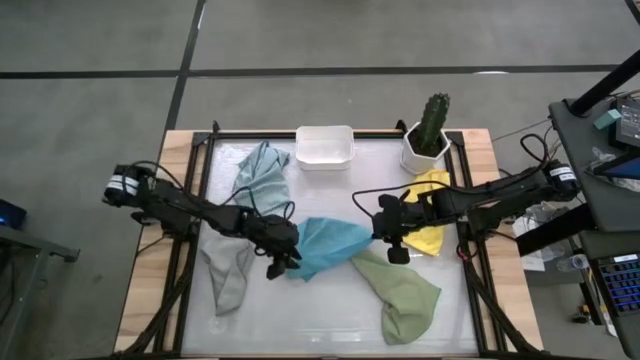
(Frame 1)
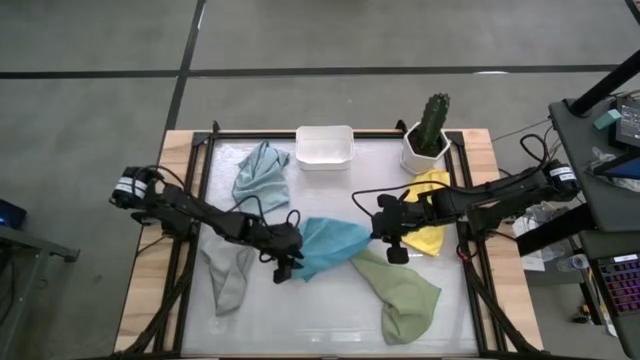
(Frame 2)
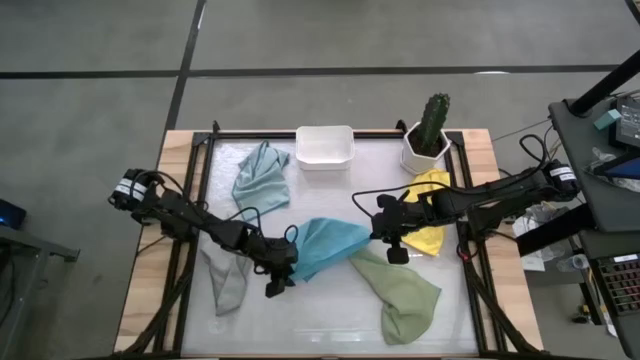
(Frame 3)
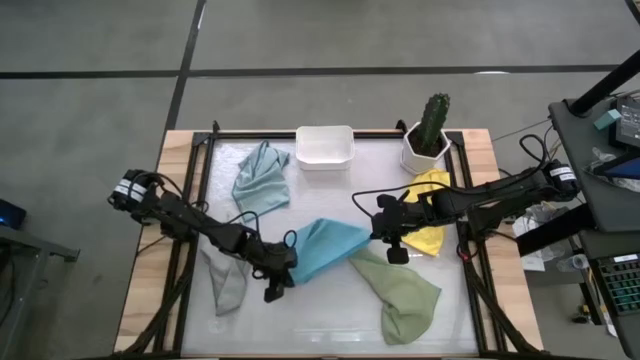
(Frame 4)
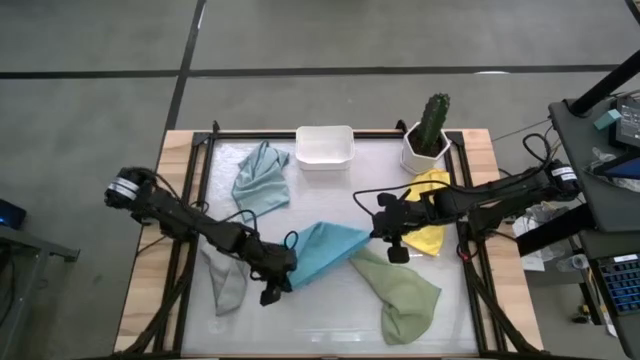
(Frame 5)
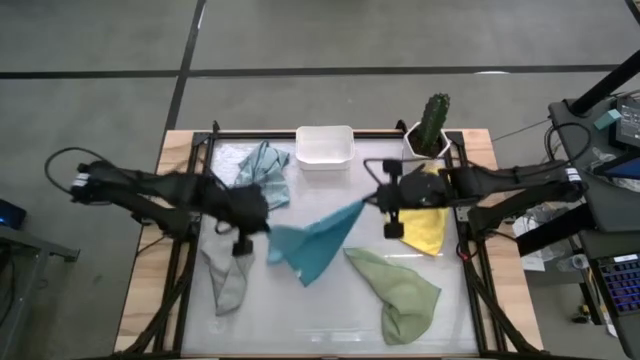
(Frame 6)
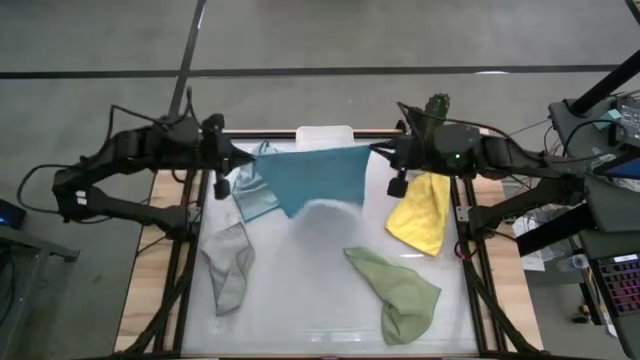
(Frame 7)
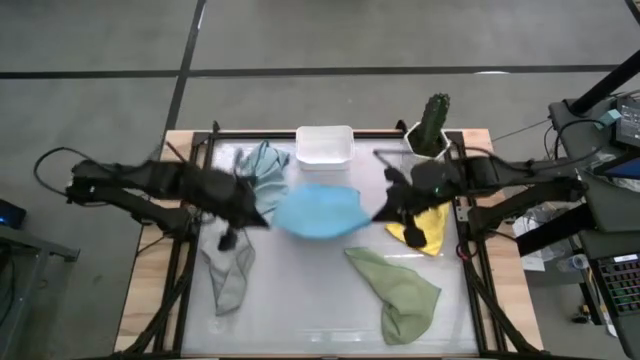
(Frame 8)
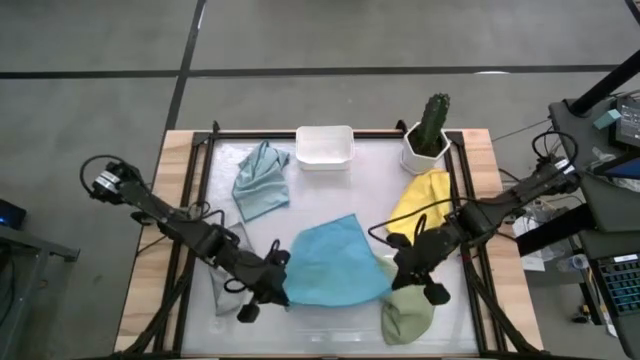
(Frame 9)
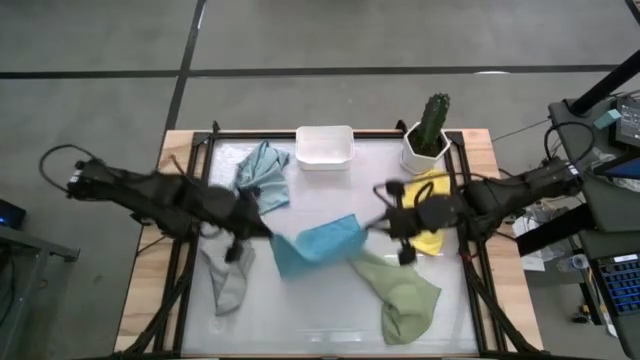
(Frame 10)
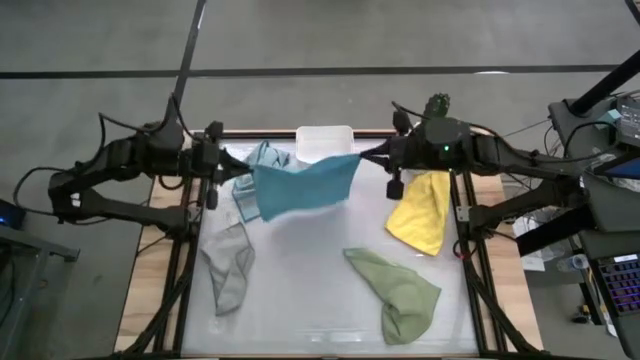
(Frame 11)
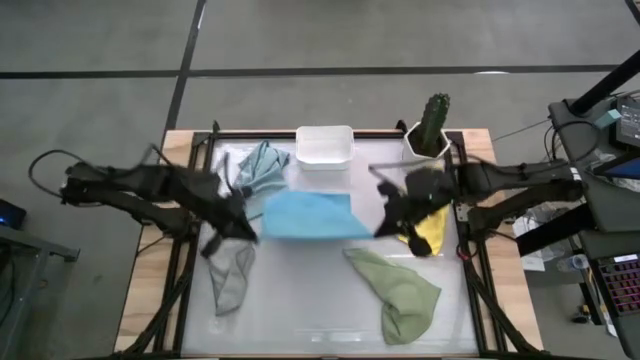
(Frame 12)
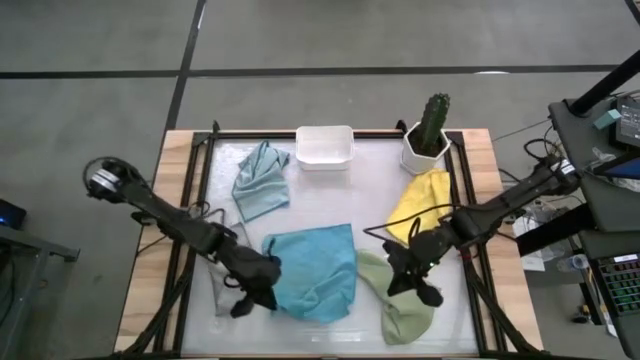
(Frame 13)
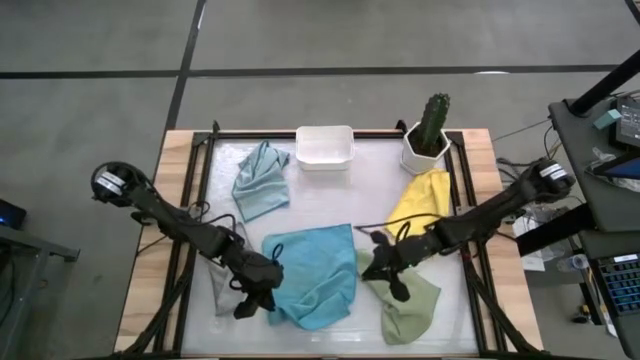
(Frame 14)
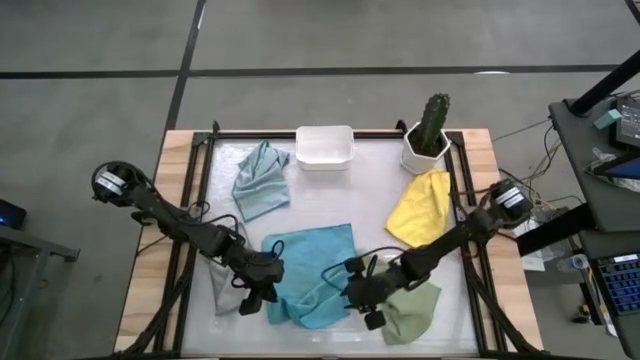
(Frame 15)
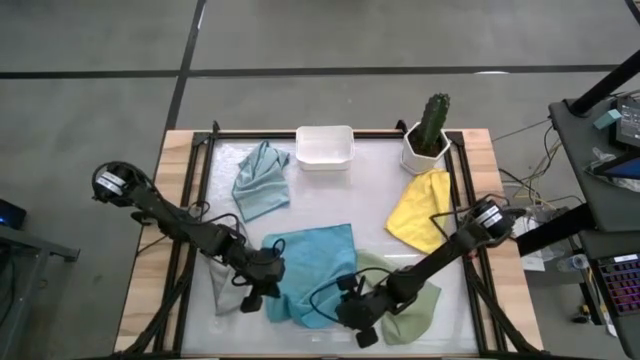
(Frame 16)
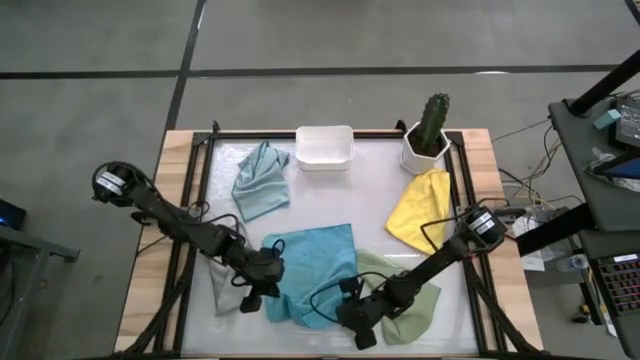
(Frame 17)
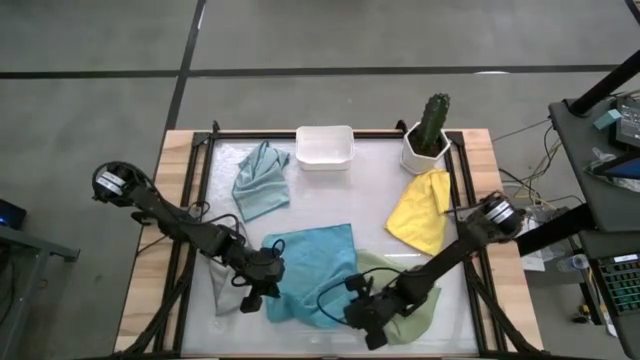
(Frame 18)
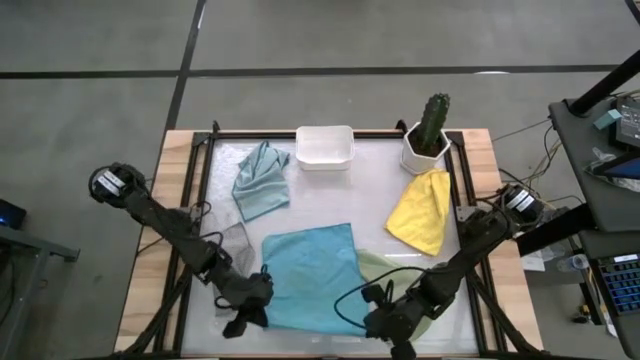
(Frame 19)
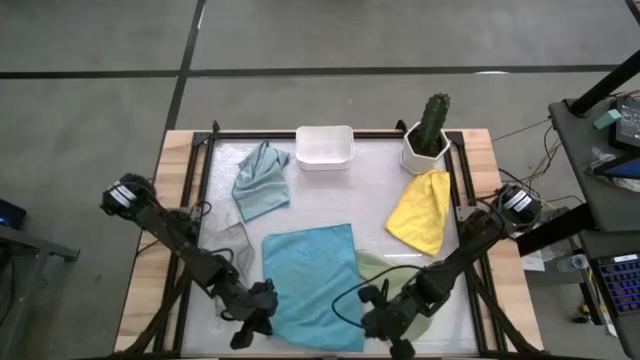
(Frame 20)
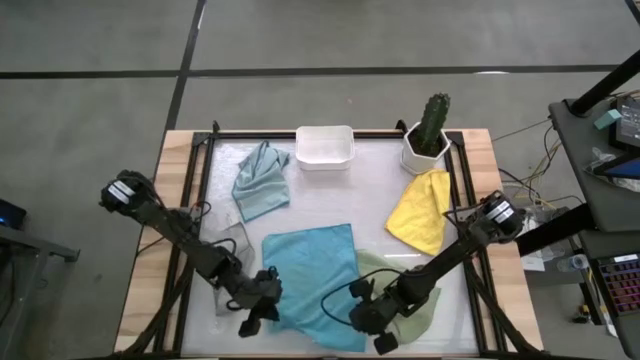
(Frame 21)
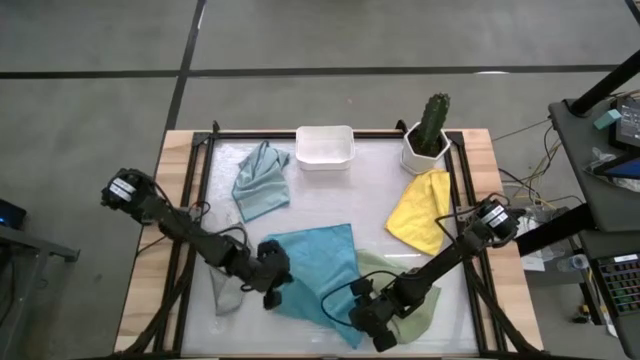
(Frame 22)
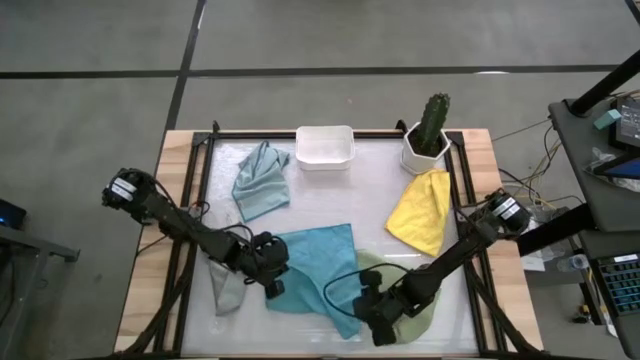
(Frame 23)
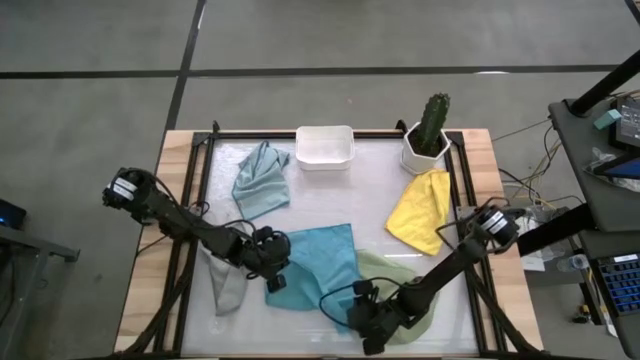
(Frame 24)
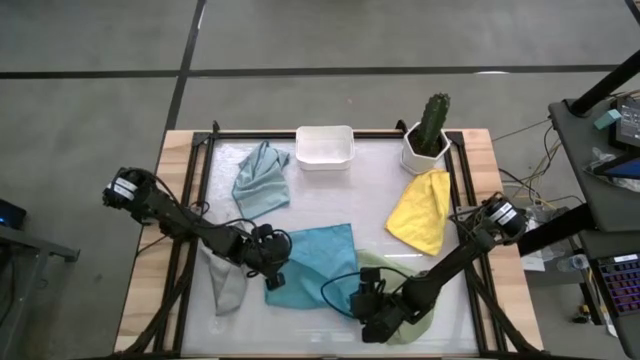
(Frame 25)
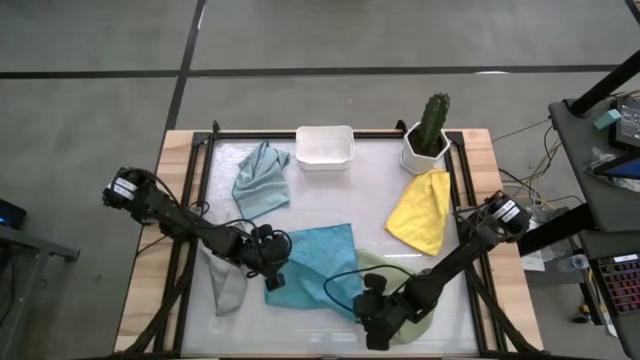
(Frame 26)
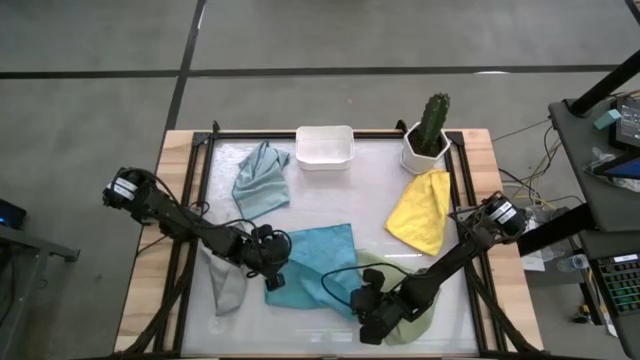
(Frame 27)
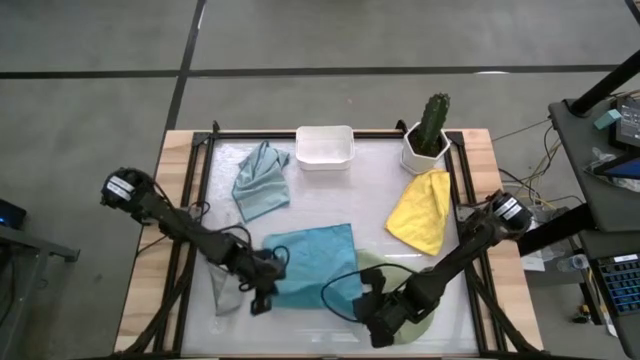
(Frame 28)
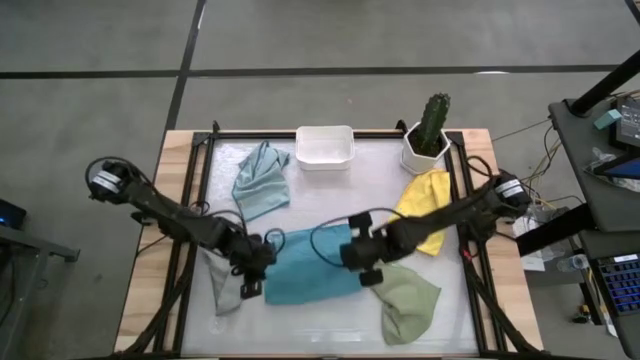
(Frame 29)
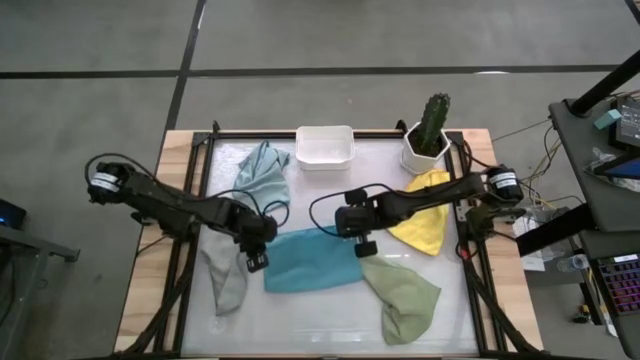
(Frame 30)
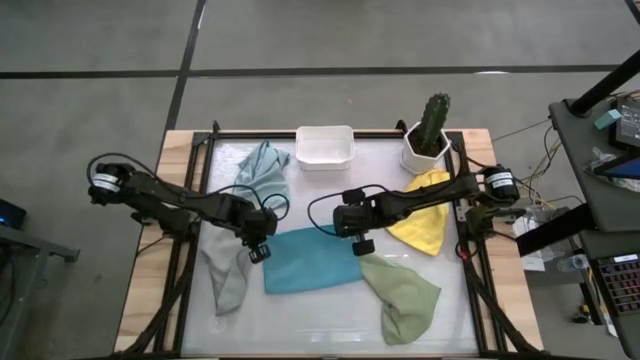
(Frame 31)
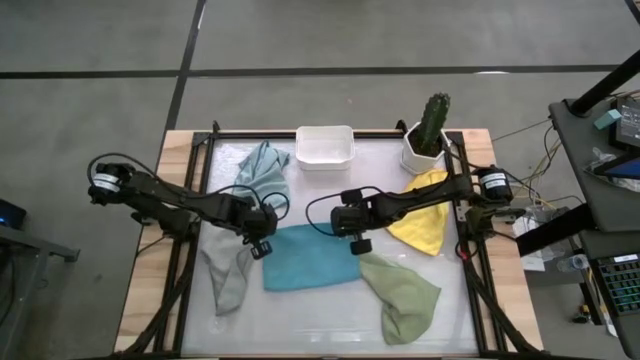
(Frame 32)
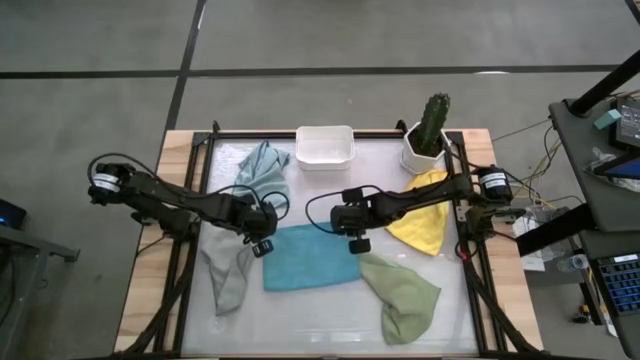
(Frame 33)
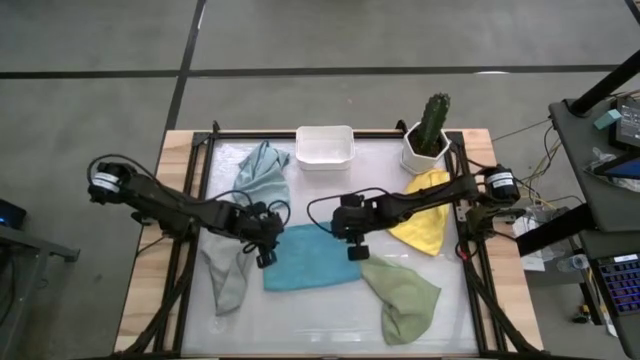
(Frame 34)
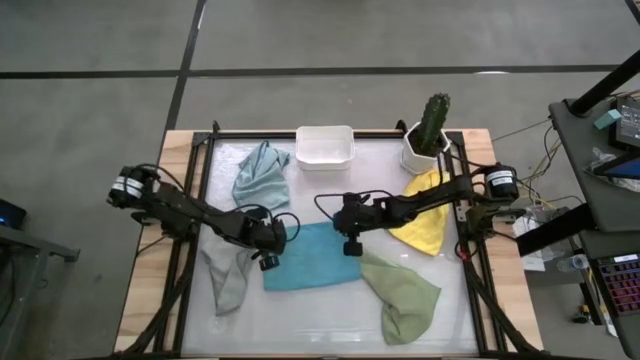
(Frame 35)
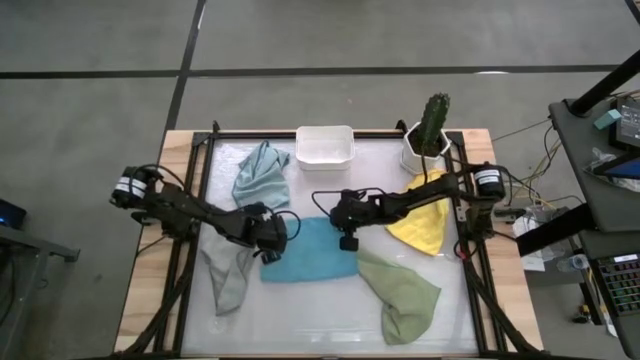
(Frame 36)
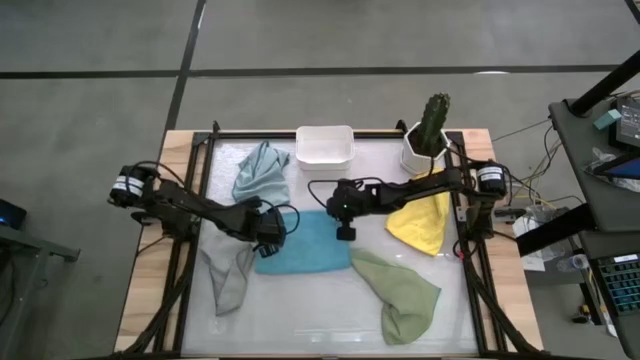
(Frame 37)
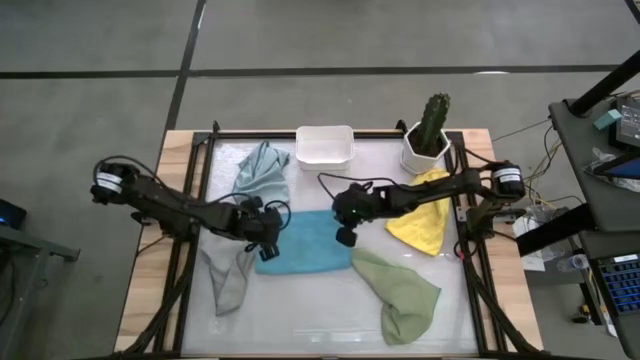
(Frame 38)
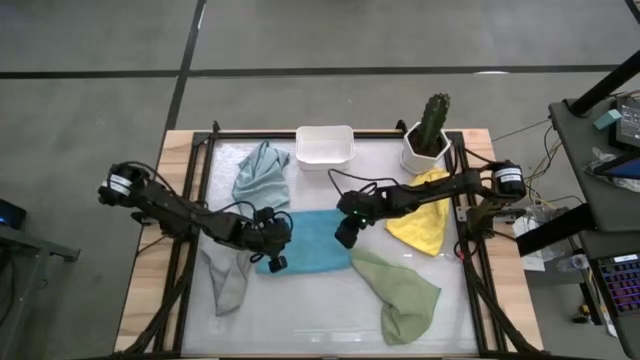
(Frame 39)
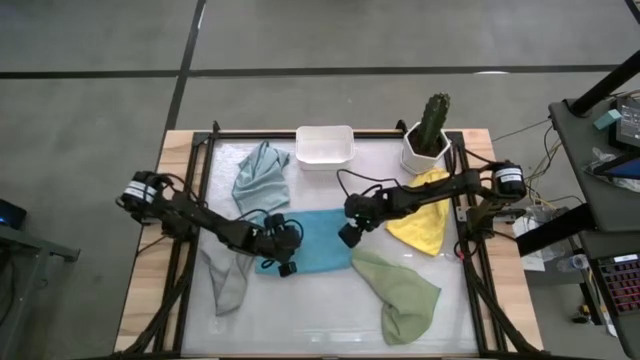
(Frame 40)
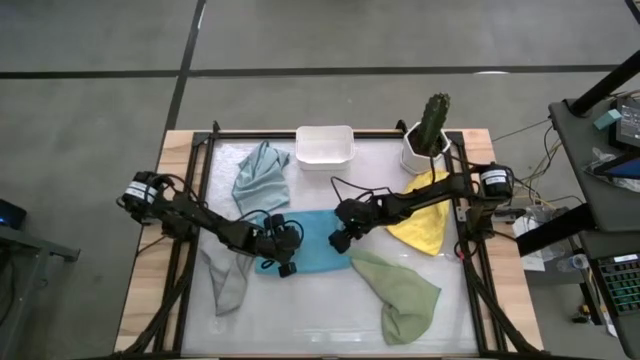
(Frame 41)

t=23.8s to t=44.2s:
Task: Fold microfiber towels
Fold the blue cloth
